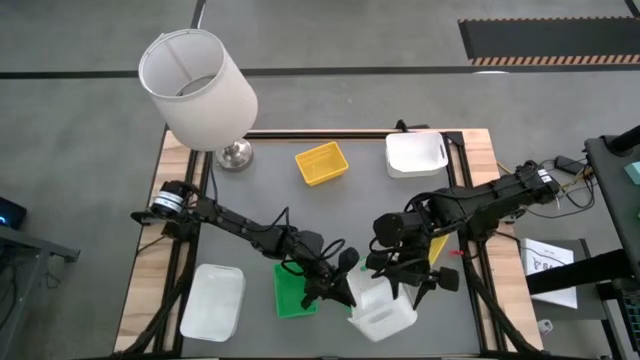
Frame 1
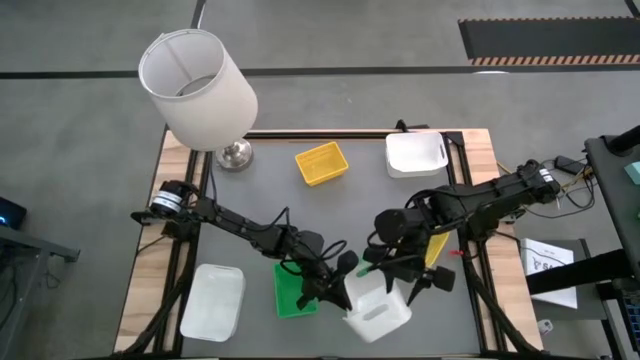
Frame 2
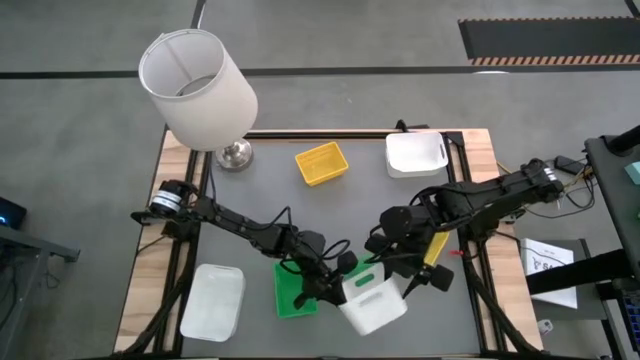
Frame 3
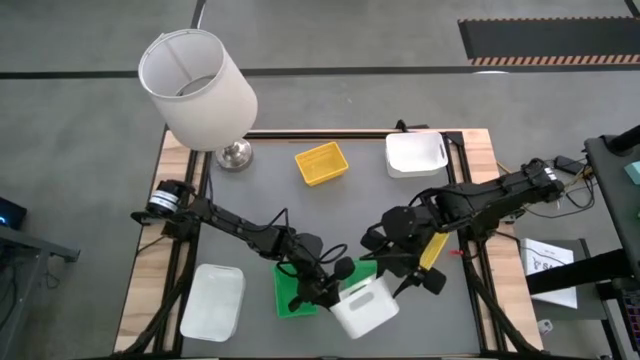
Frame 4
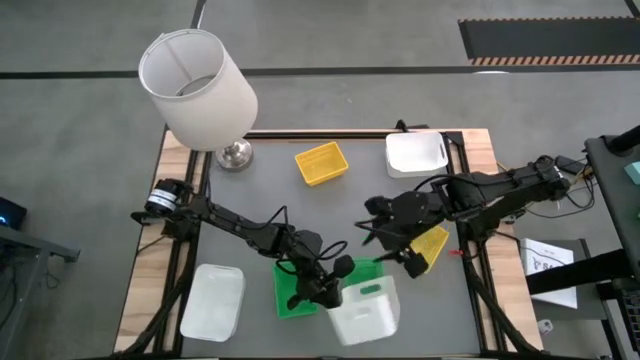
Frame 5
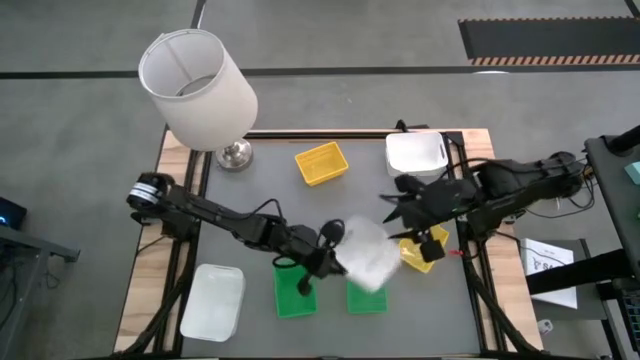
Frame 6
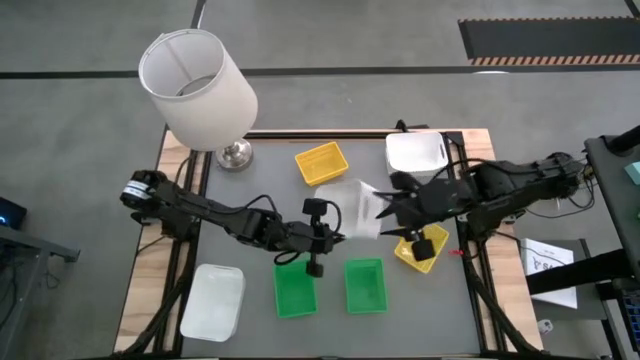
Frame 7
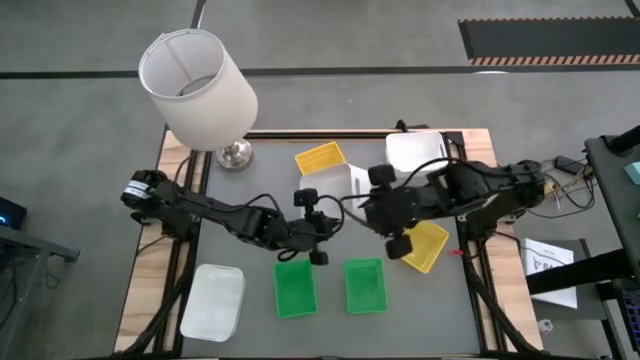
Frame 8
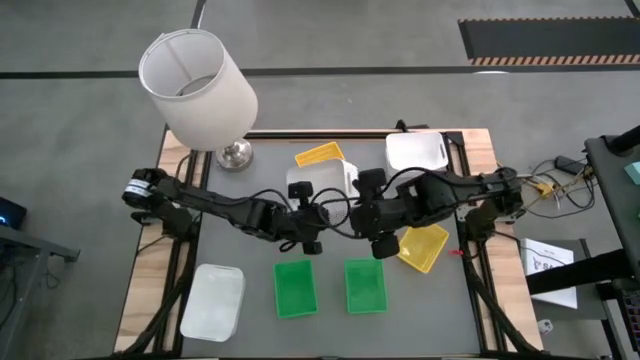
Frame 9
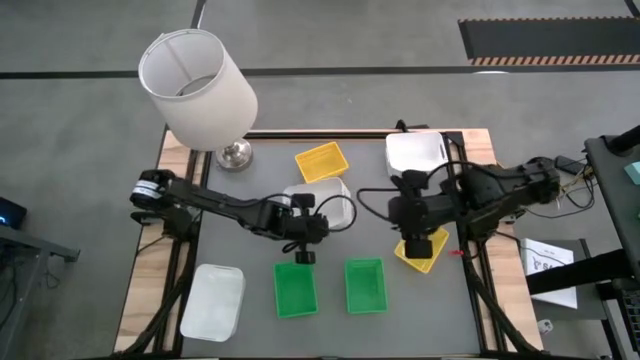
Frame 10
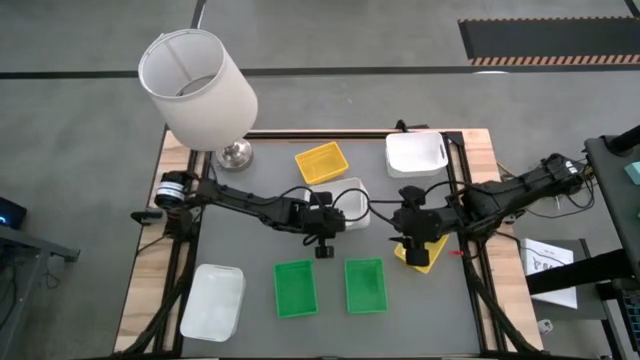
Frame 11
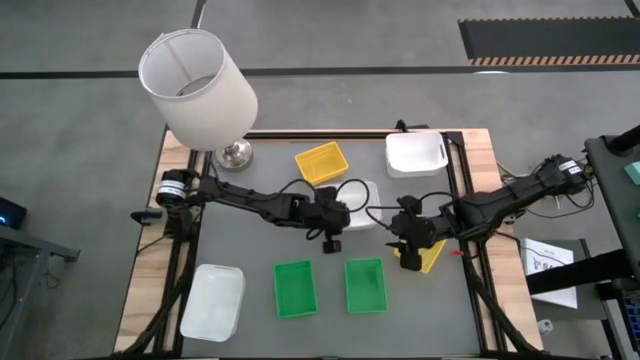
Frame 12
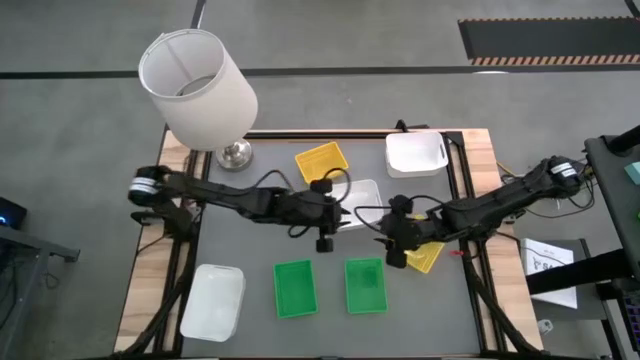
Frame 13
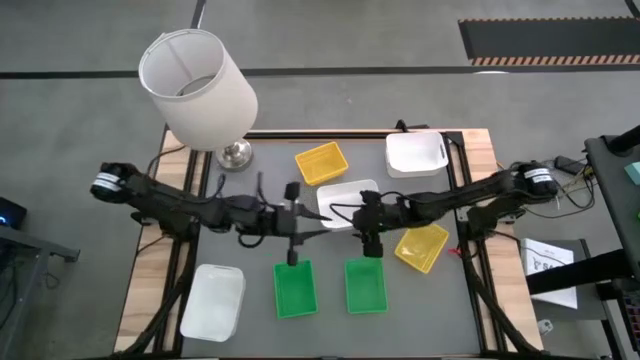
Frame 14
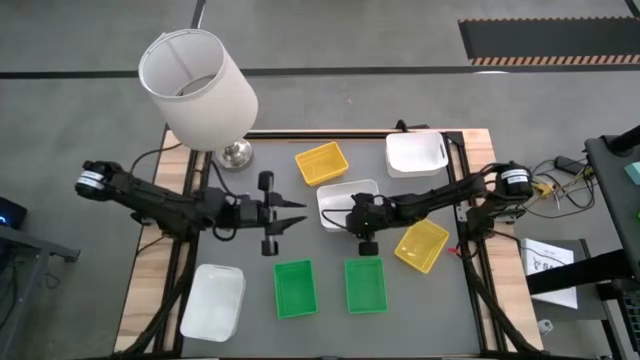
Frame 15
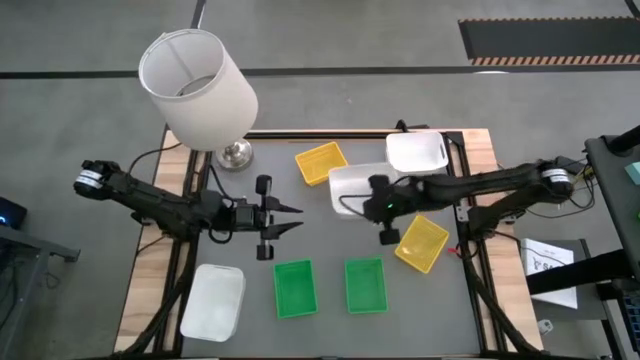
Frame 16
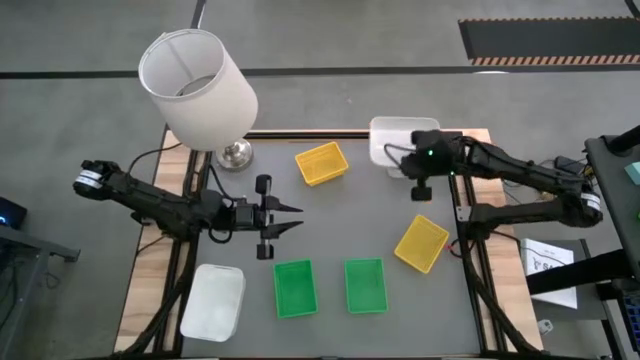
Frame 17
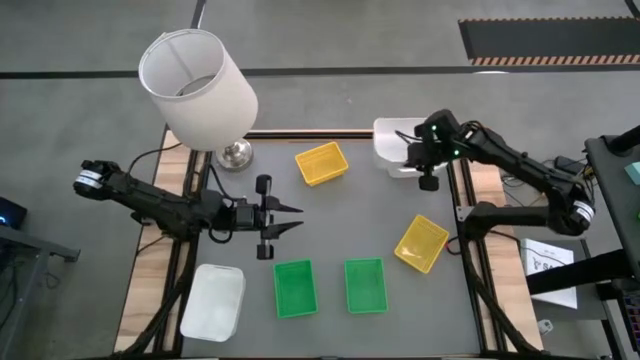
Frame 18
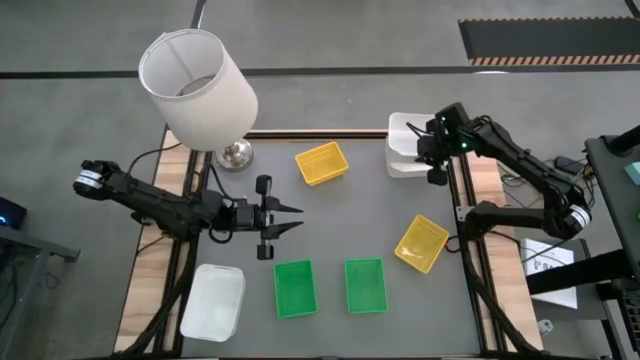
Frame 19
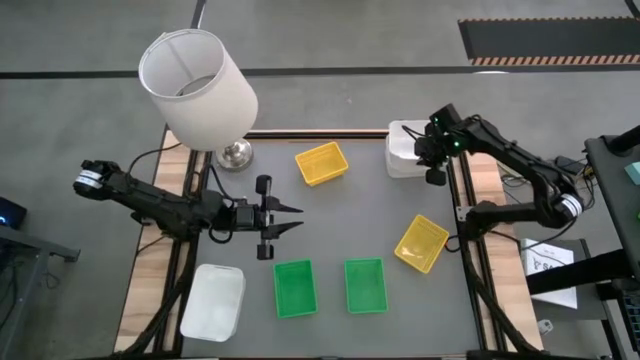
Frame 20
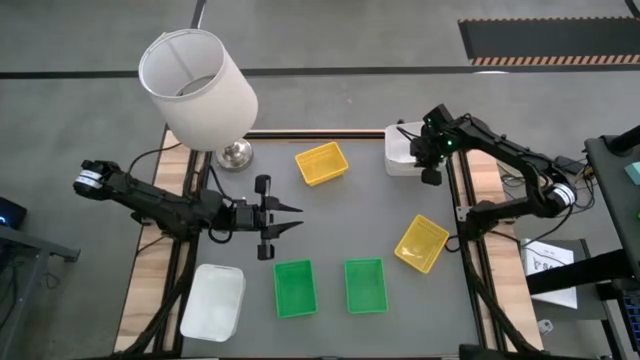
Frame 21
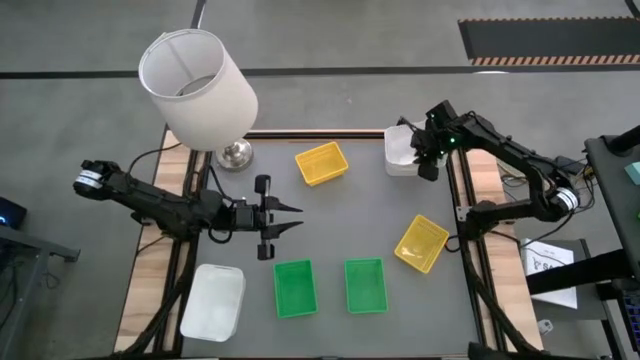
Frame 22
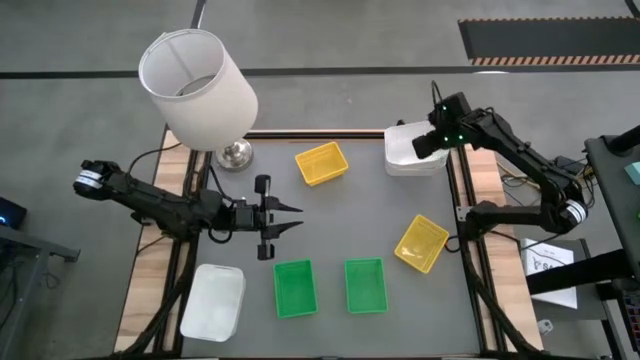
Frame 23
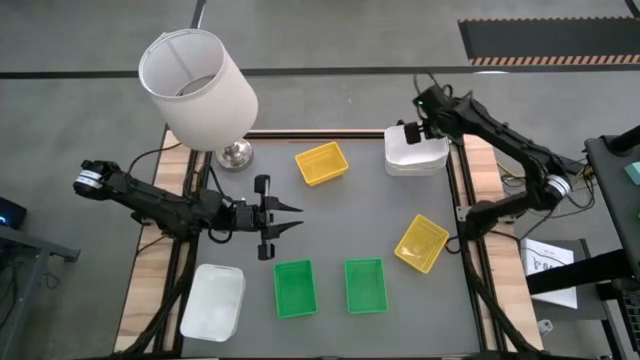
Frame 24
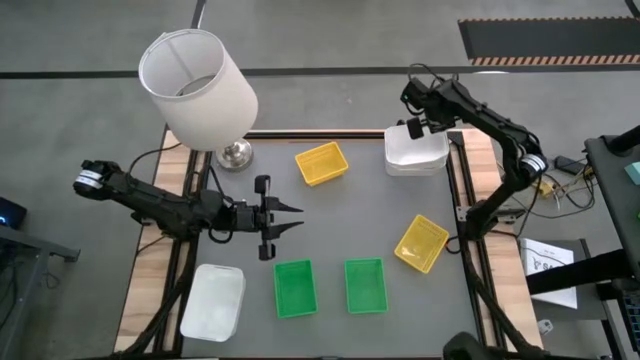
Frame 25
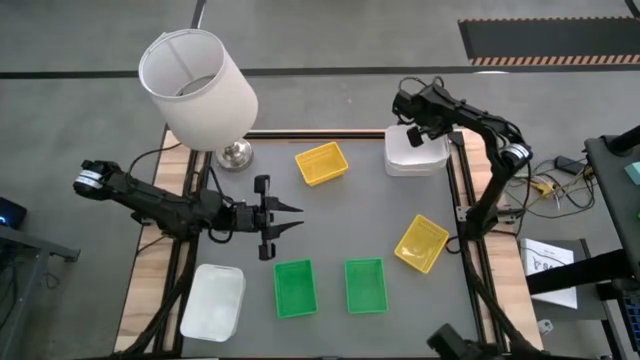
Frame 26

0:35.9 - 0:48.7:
Stack the middle white bin on the top white bin
